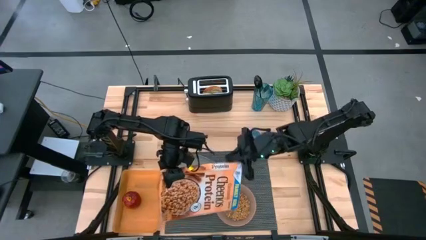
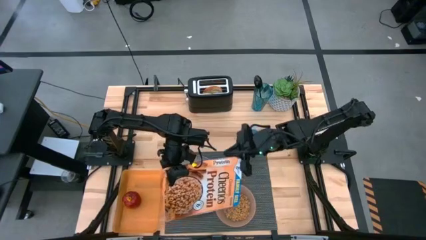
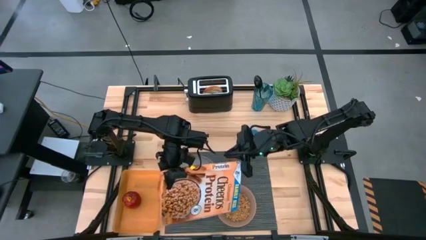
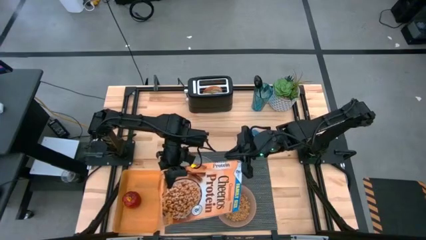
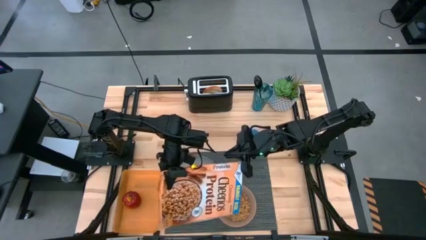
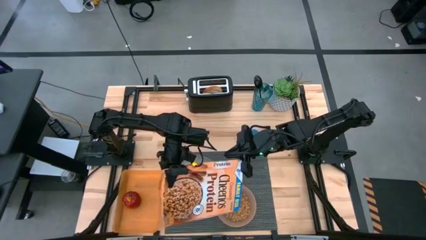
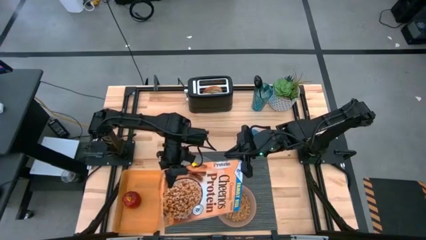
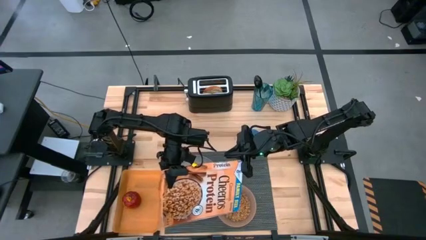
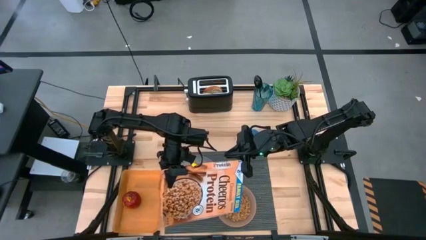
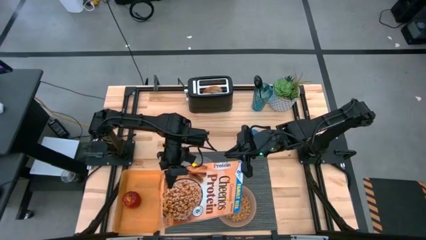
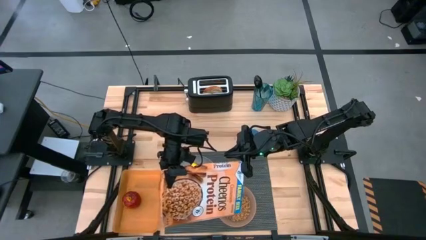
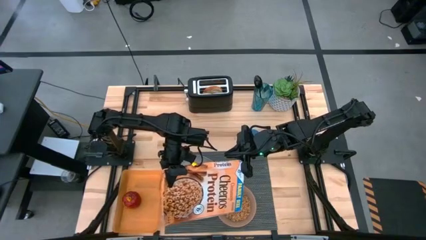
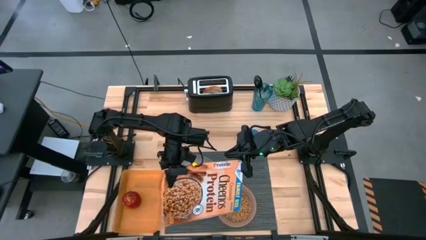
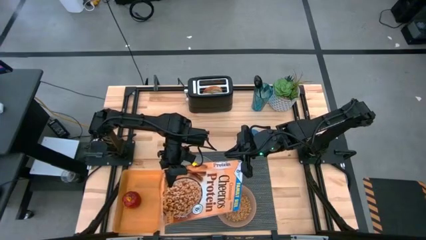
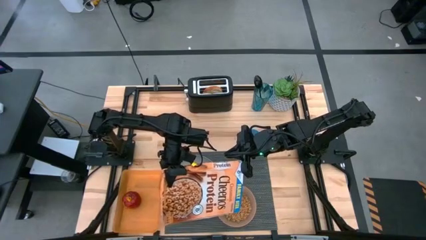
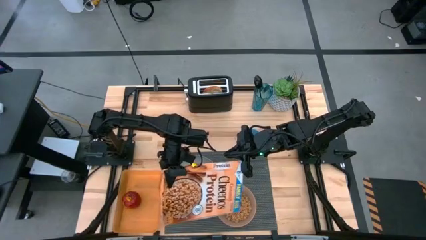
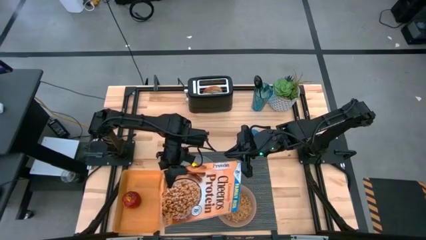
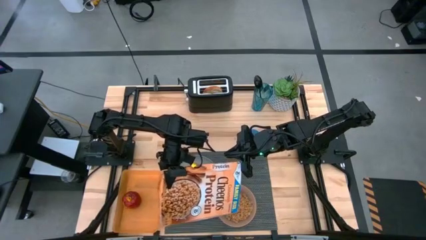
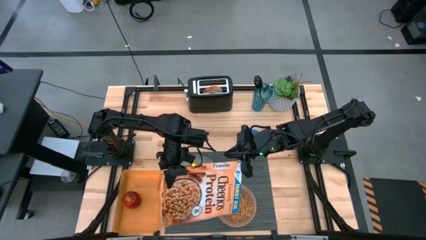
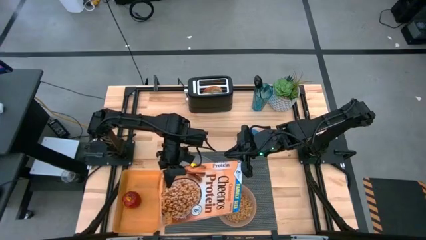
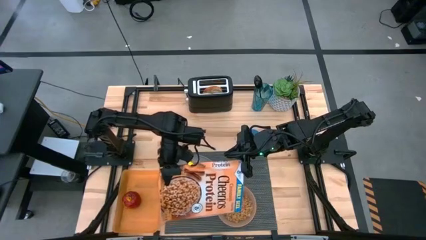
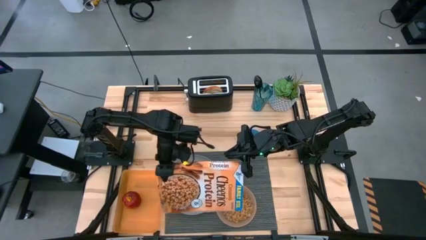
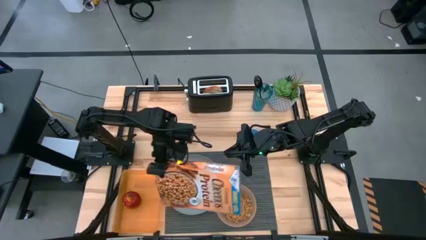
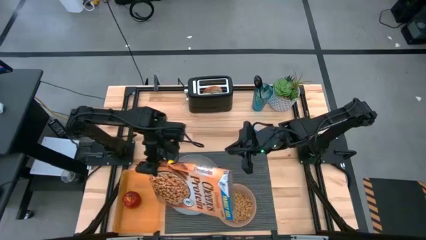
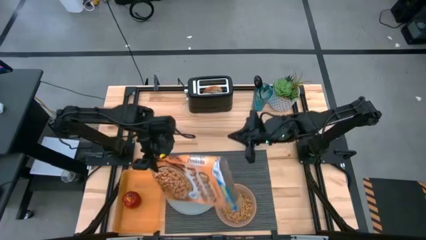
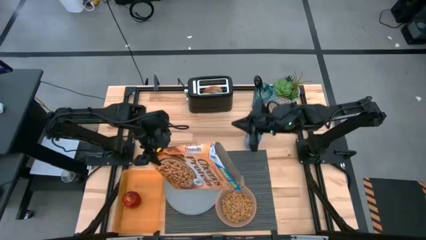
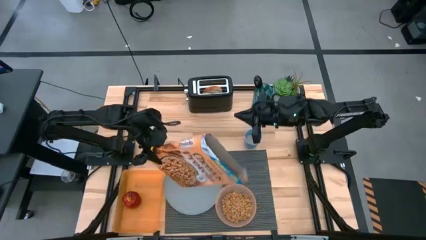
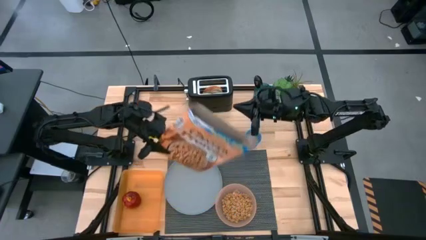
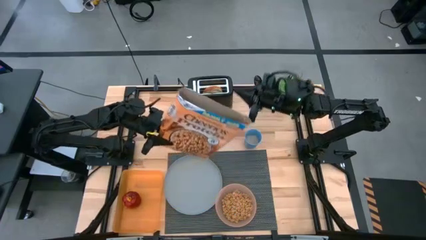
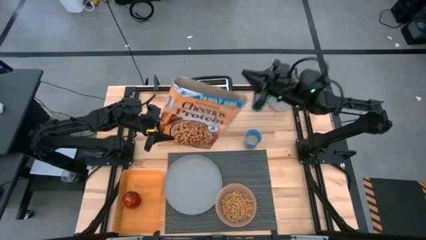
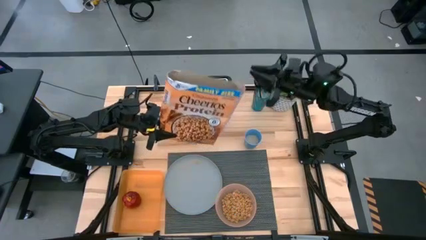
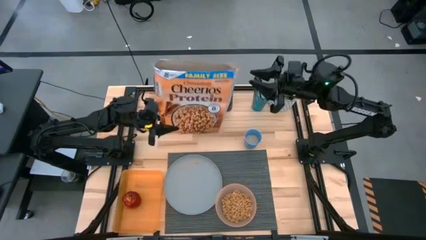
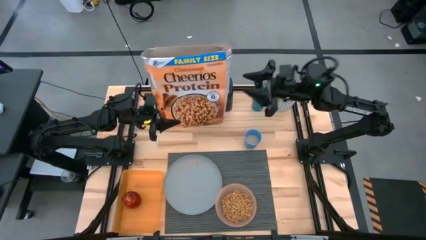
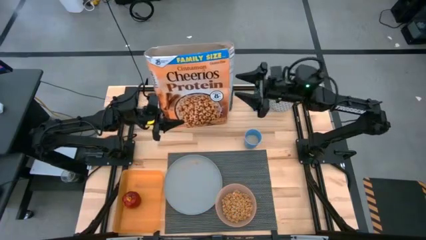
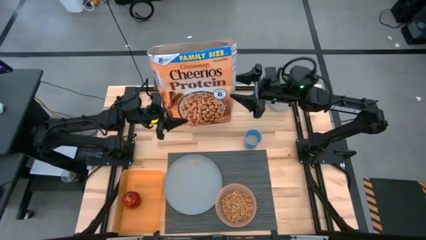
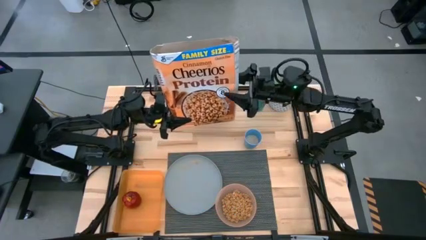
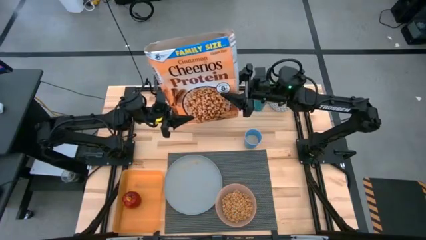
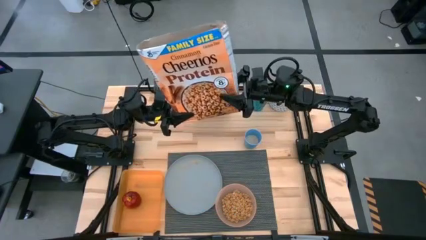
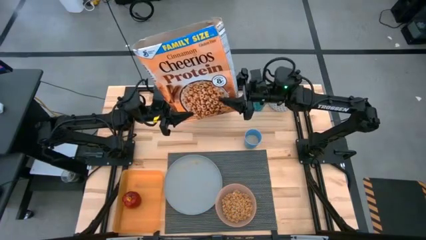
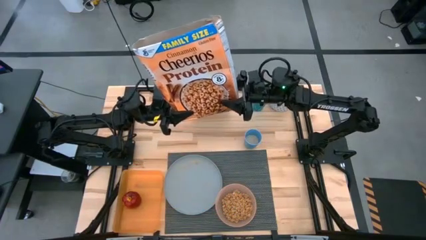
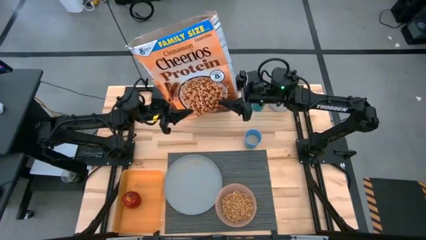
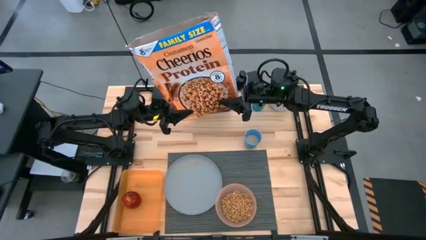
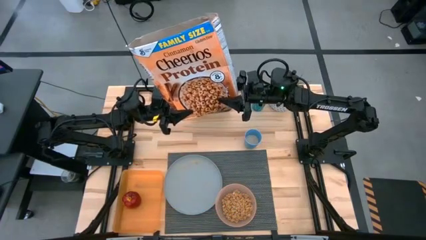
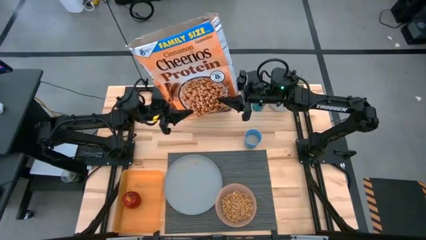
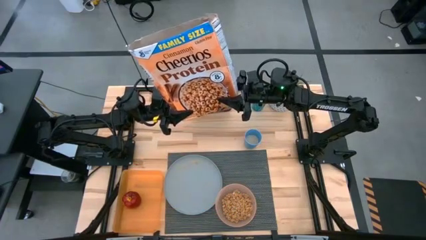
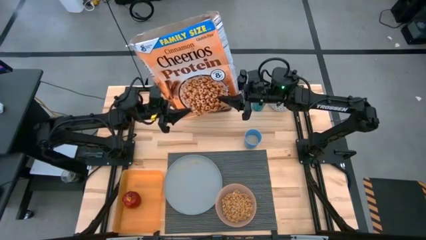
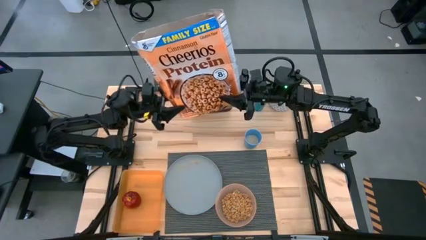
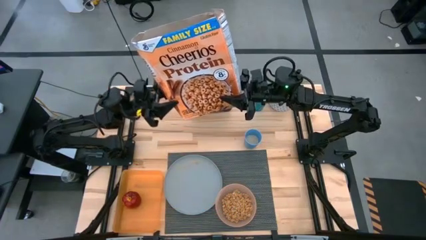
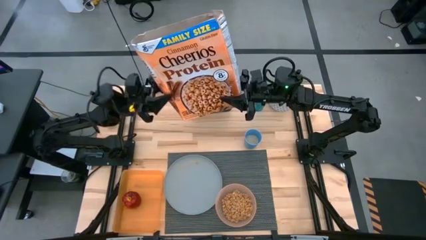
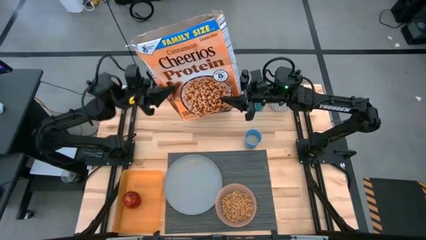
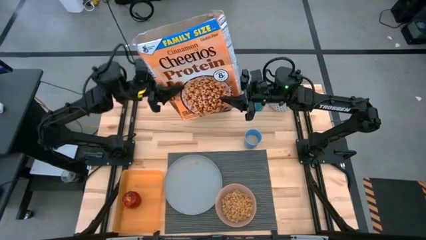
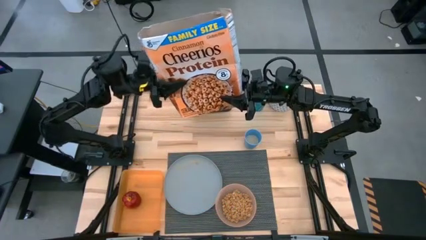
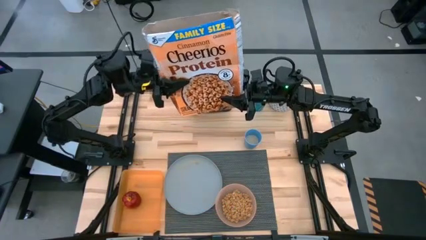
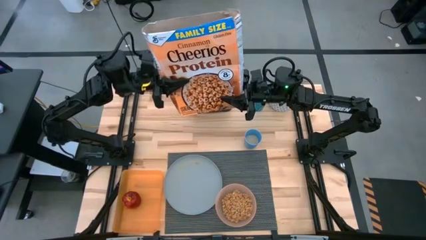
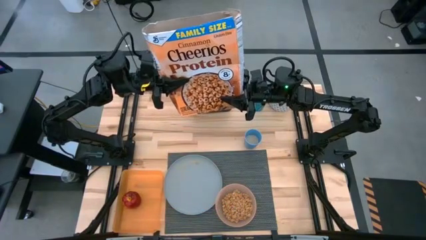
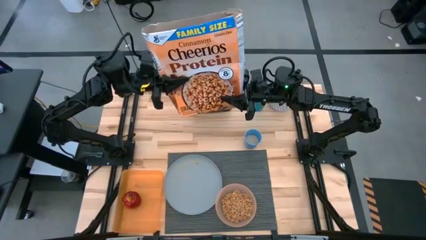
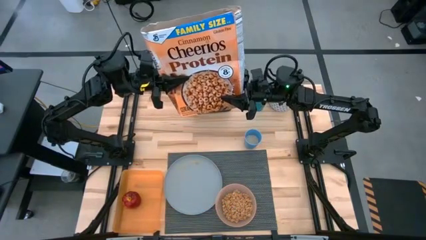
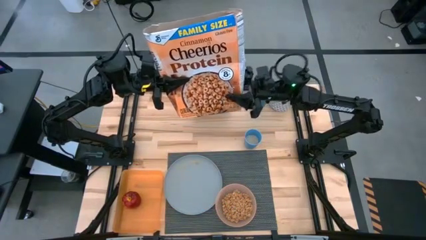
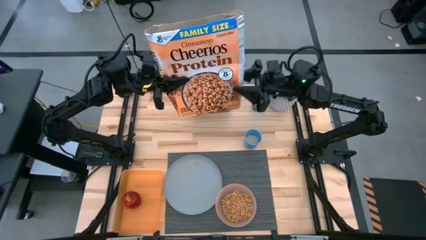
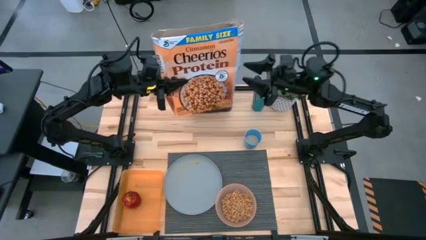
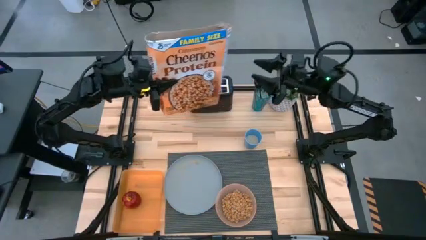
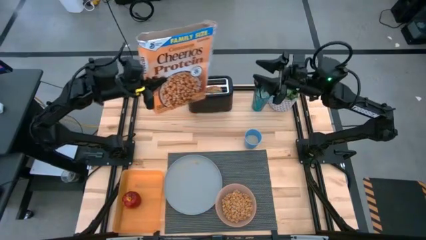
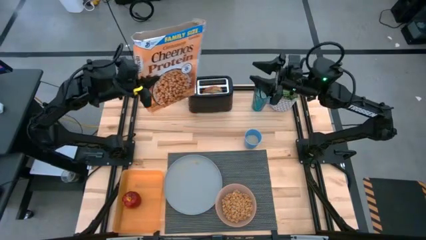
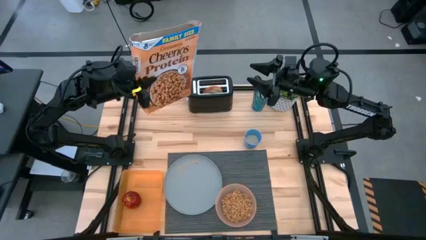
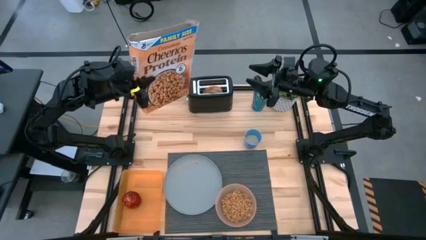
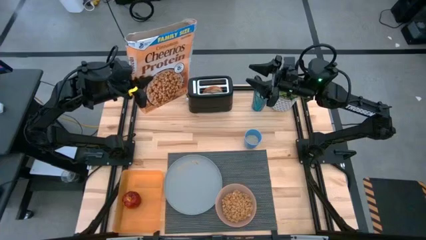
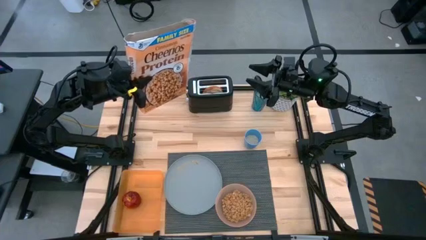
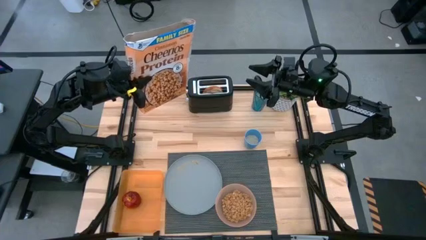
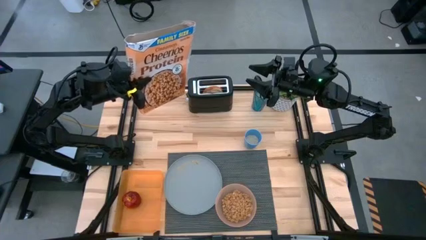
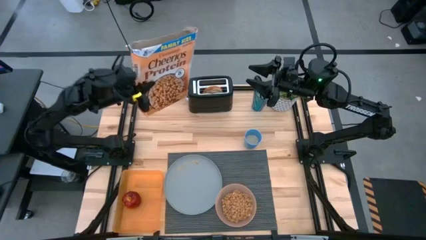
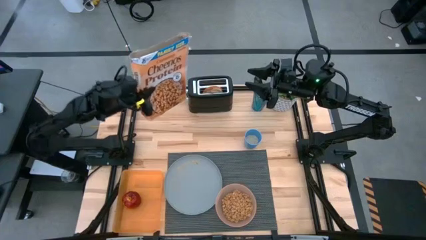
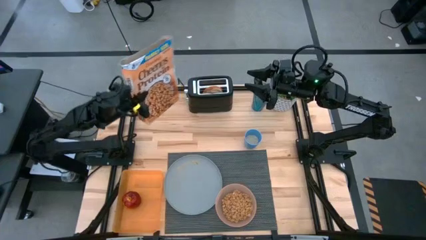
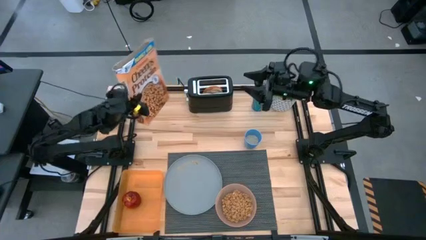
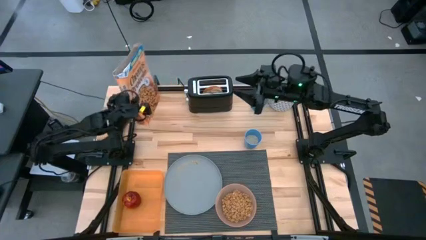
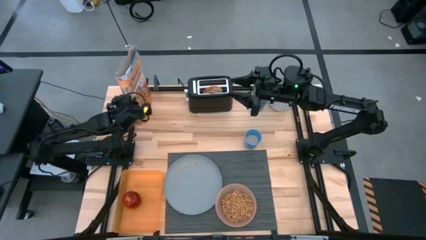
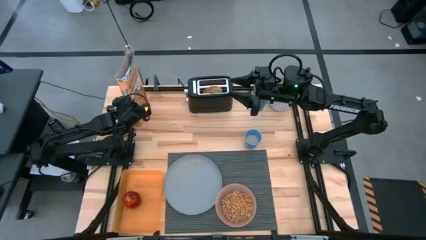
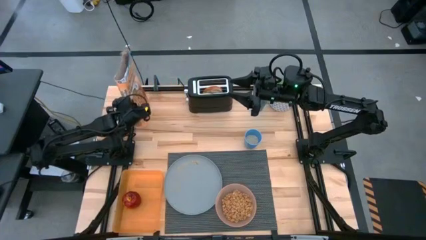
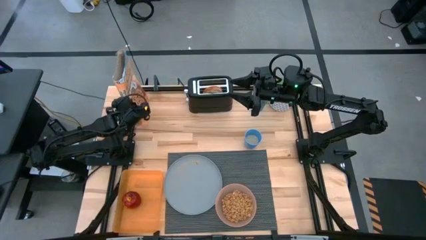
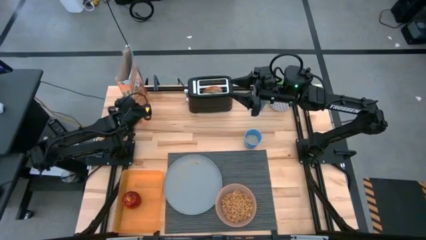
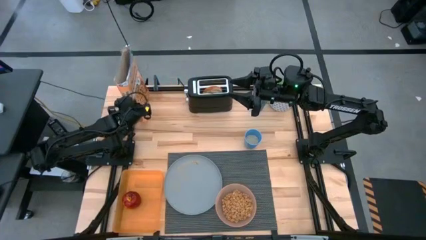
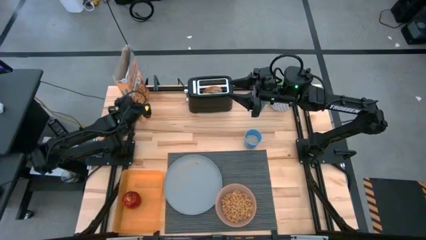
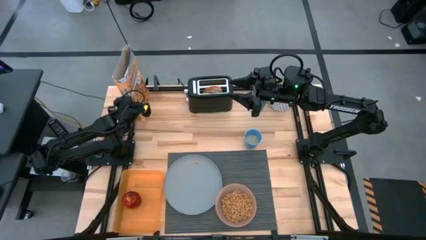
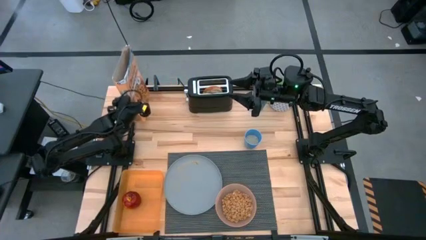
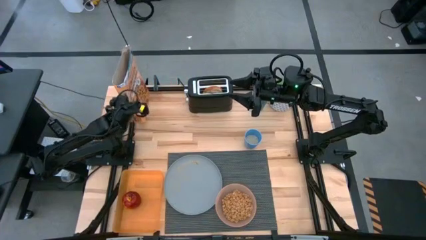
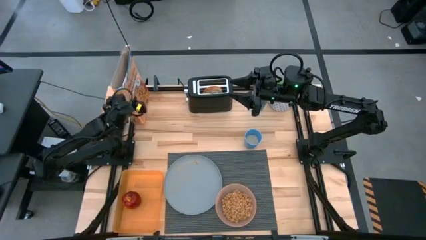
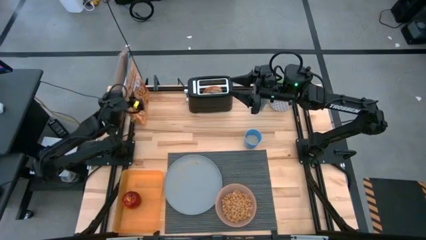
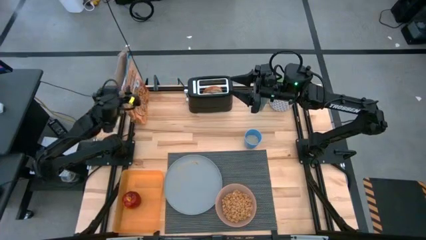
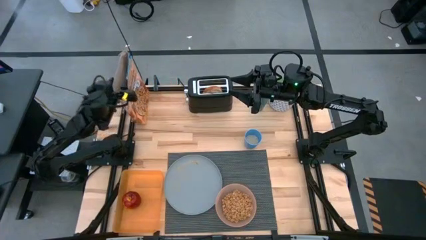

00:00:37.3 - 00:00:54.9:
Task: Arrange a breakfast setting
Pour the cereal from the cereal box into the orange bowl
